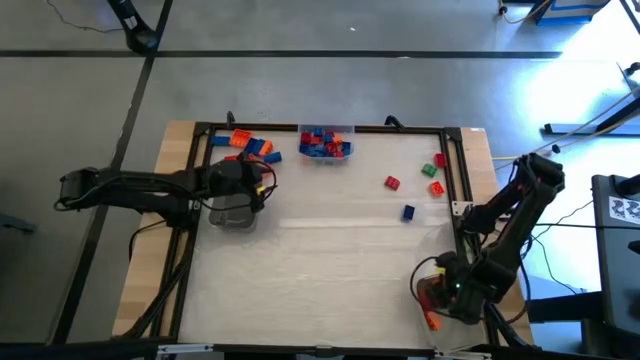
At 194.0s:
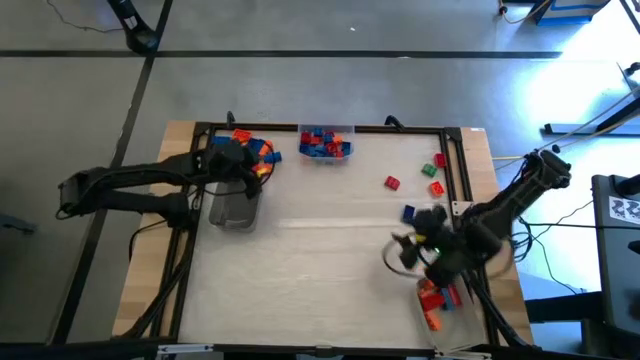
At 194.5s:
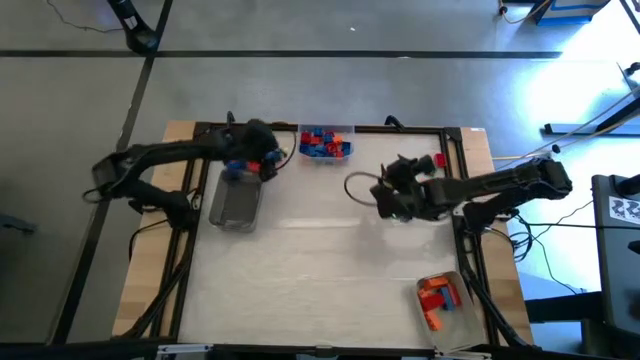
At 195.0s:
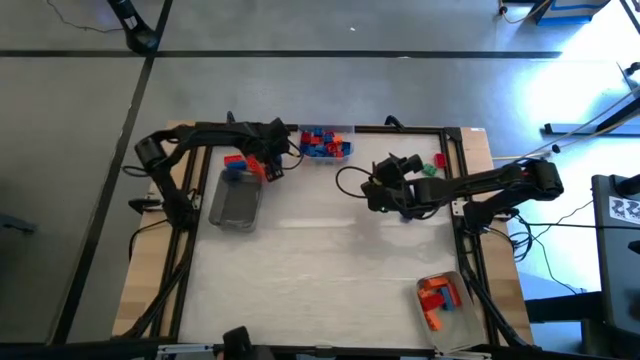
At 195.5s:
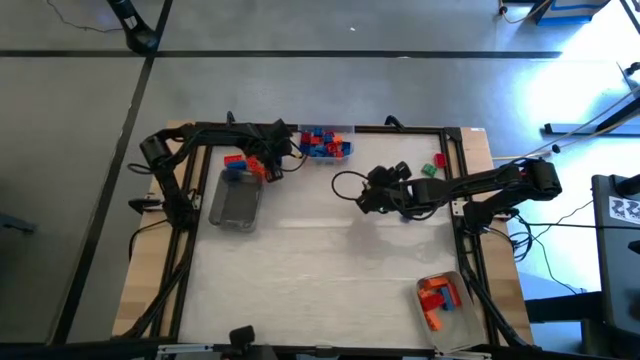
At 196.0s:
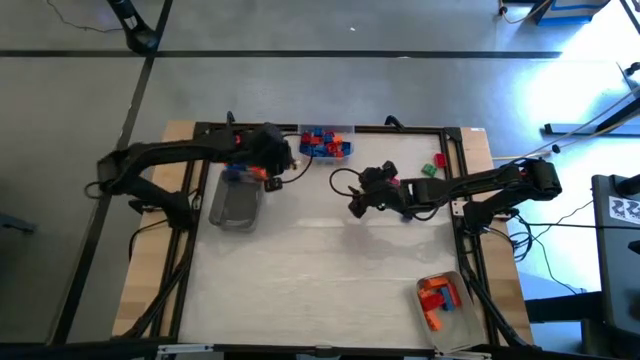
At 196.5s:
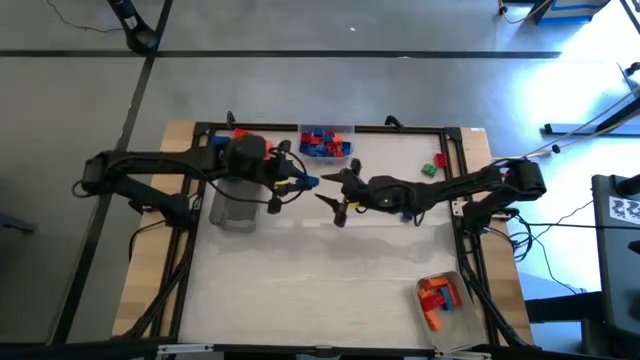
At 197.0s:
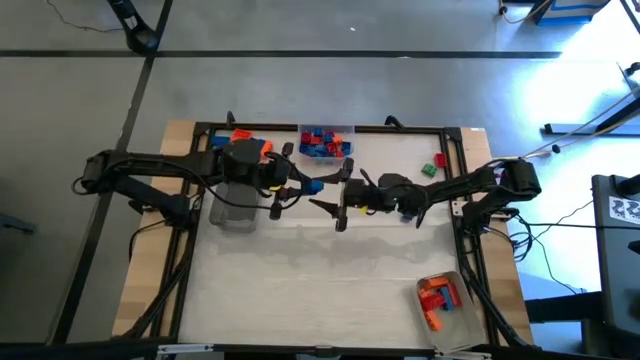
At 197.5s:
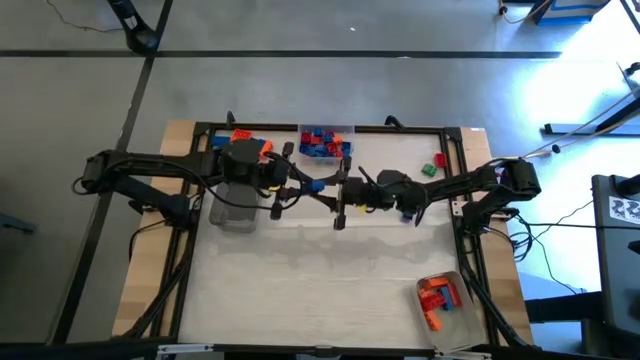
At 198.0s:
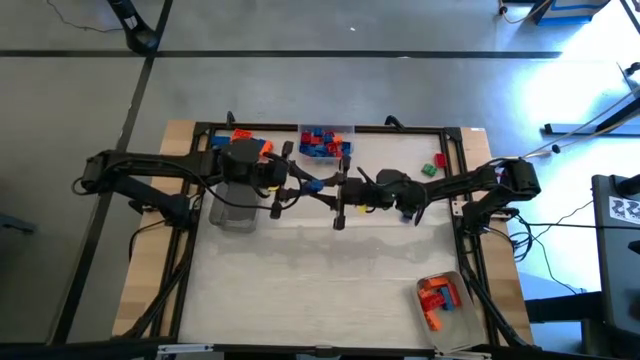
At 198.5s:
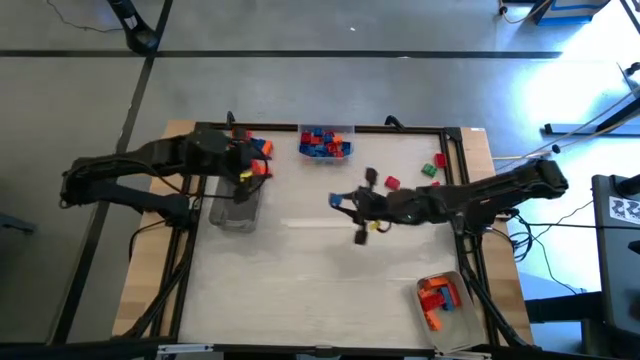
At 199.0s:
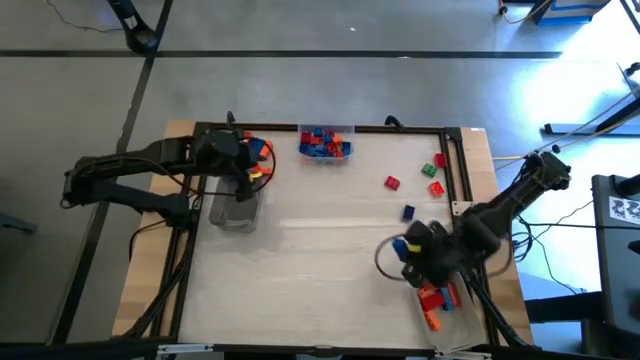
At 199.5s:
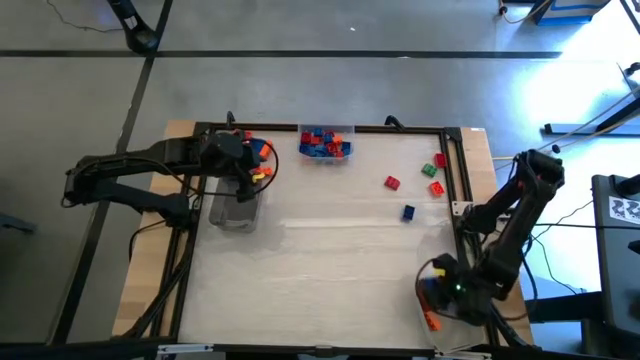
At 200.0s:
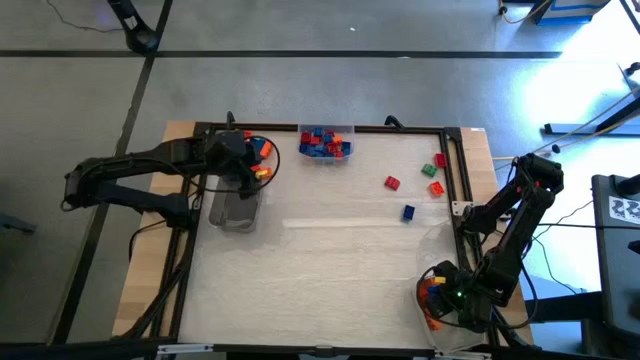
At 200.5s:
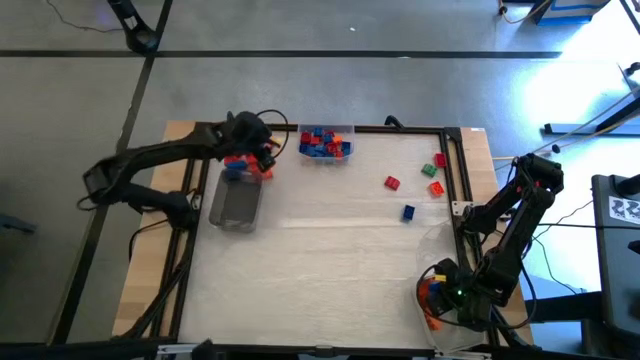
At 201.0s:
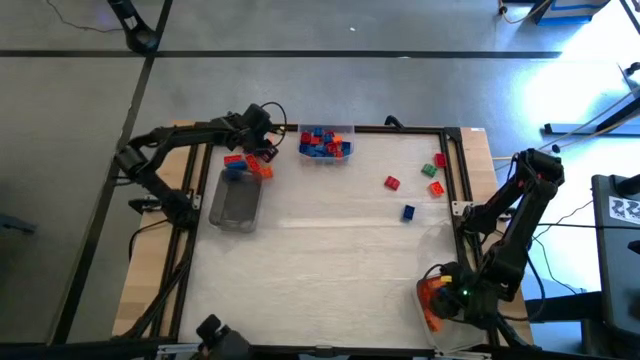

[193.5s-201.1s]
Task: Sort blocks by size
Put the blue 8 stud game piece into the gray bin

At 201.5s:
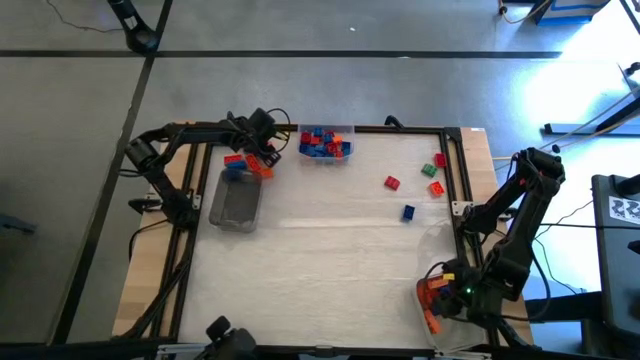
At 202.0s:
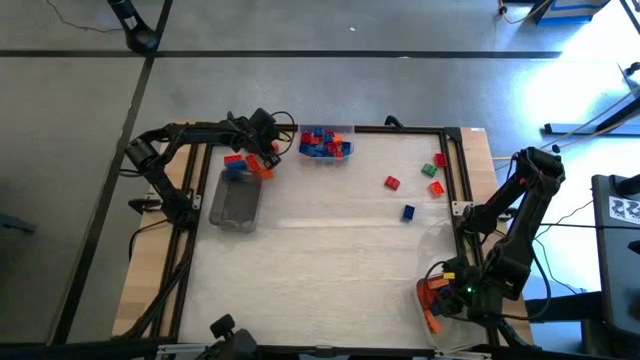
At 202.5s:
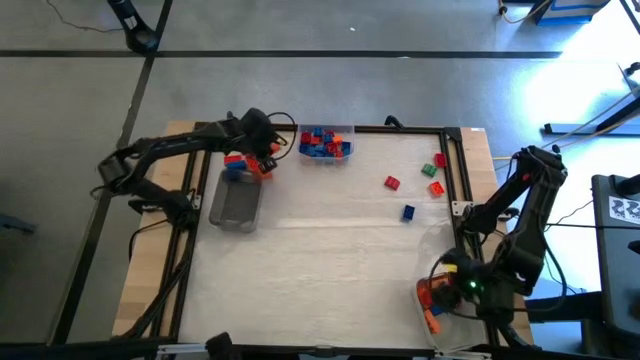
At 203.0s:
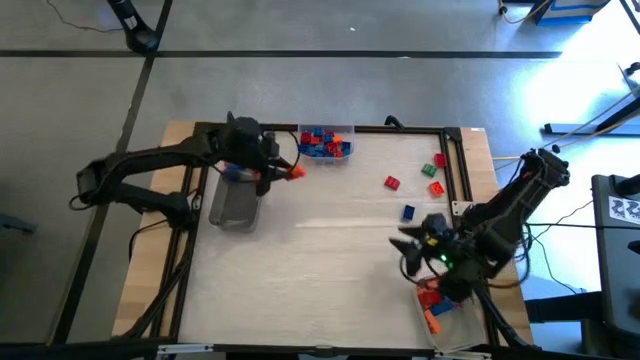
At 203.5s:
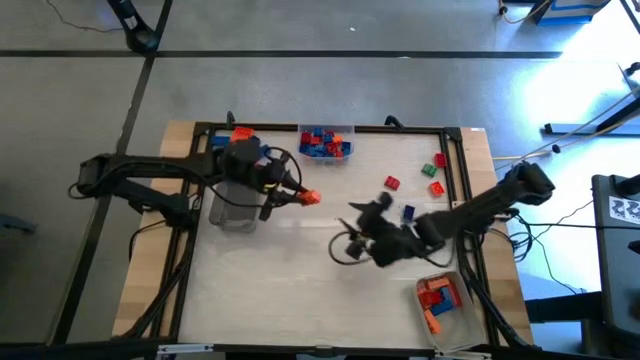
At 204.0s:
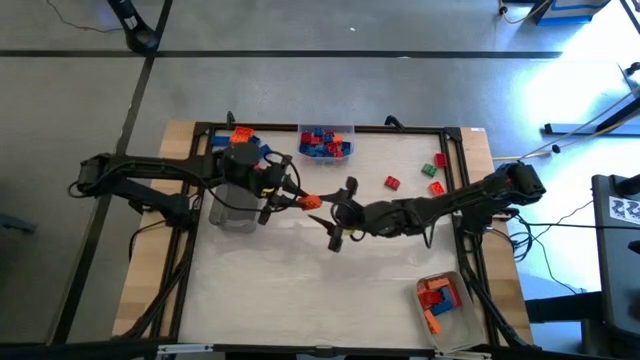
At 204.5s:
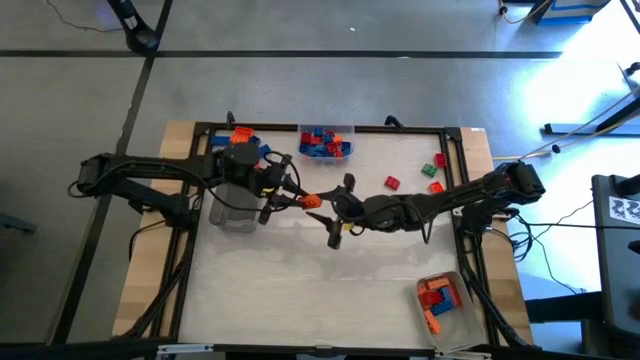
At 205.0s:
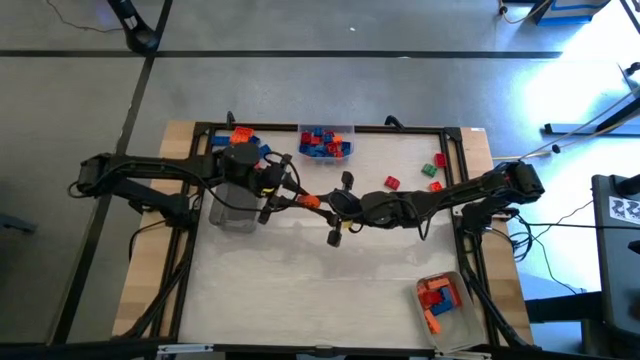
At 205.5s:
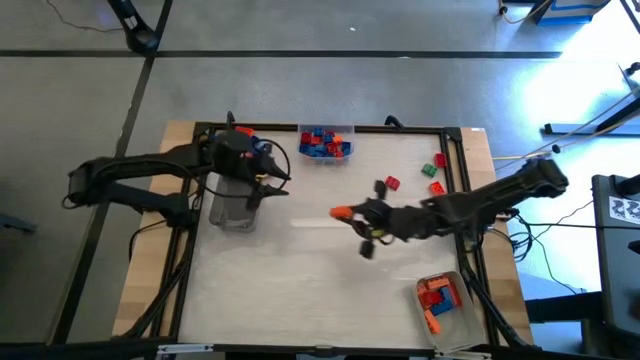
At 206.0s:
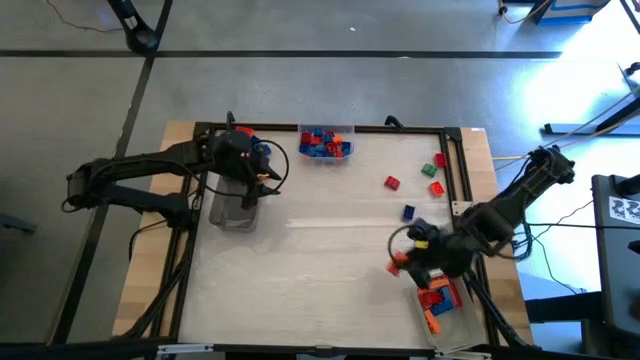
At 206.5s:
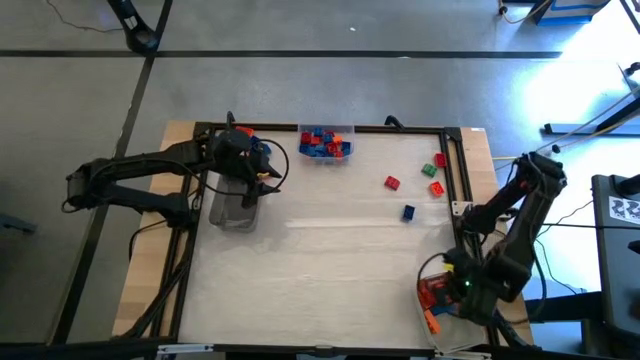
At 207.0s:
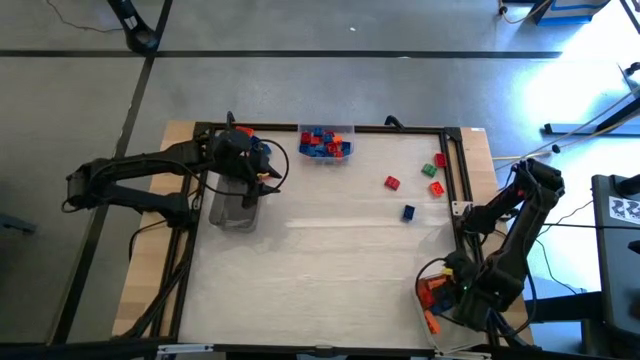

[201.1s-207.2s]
Put the orange 8 stud game piece into the gray bin

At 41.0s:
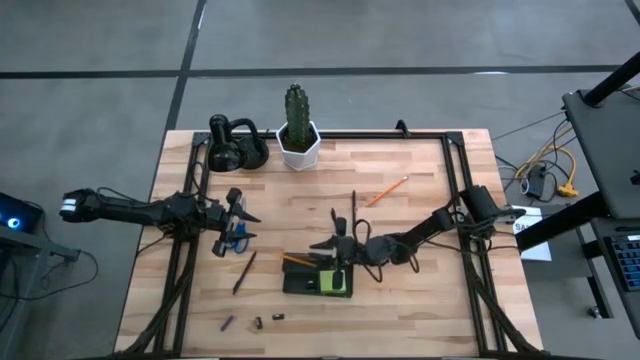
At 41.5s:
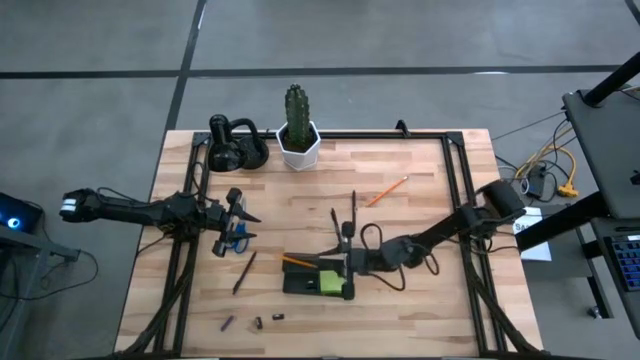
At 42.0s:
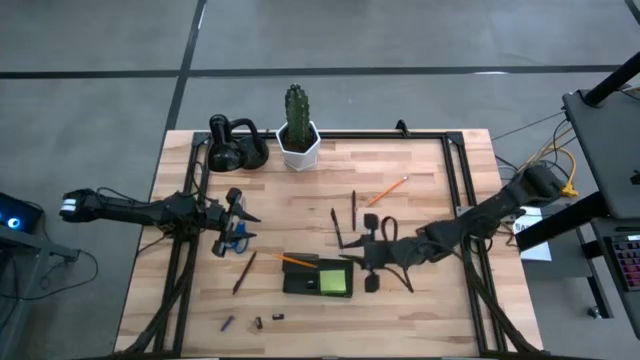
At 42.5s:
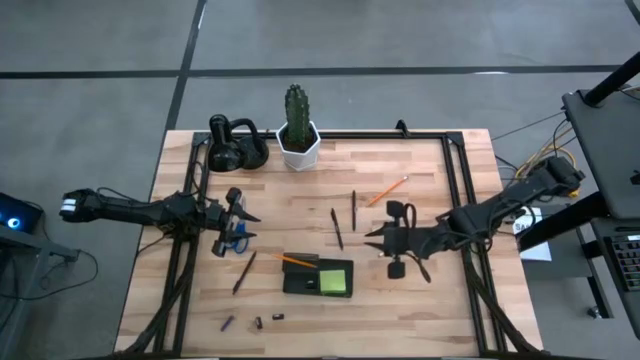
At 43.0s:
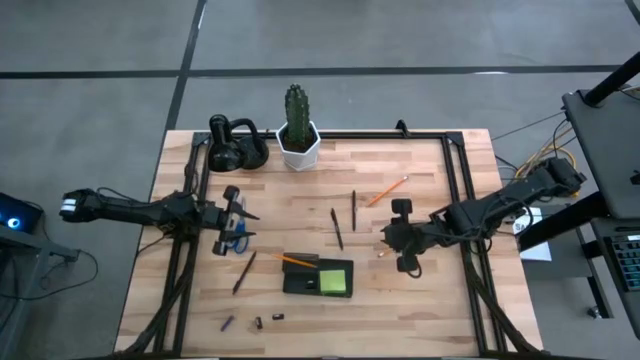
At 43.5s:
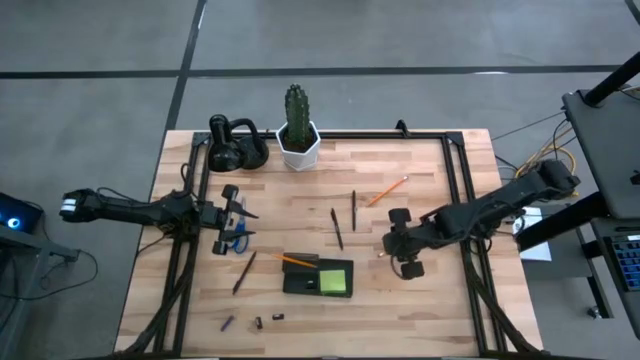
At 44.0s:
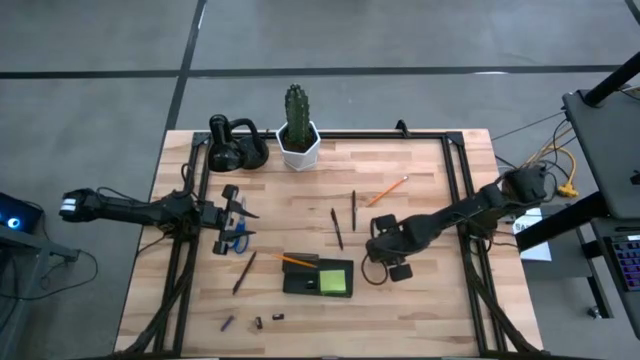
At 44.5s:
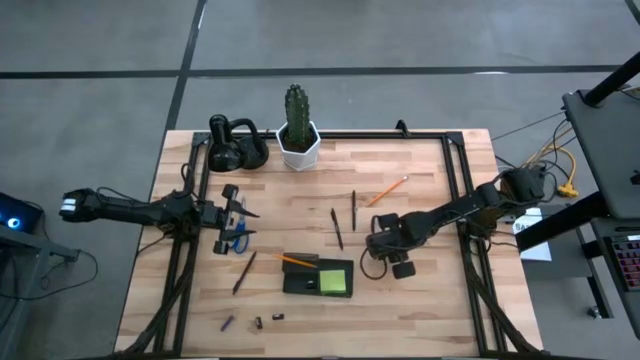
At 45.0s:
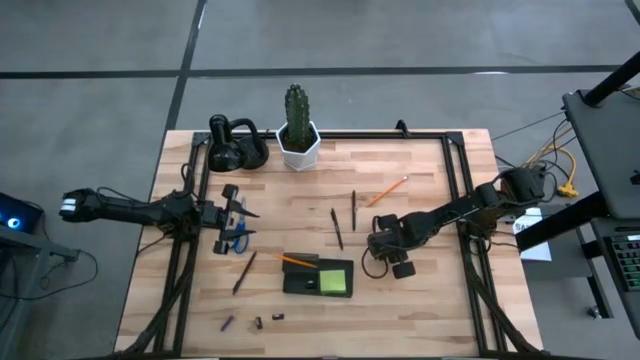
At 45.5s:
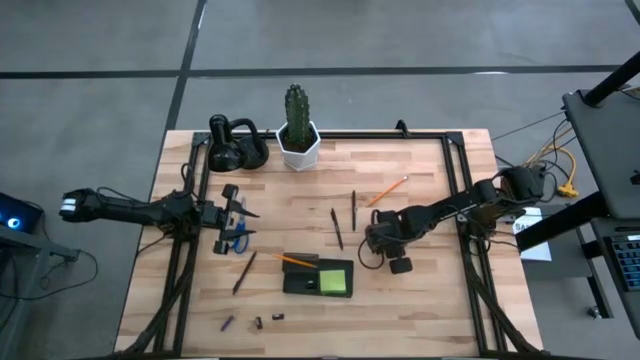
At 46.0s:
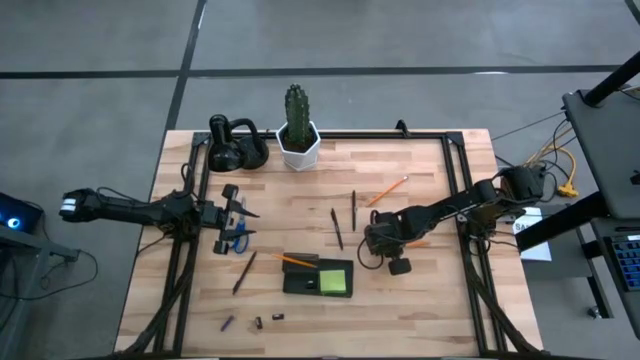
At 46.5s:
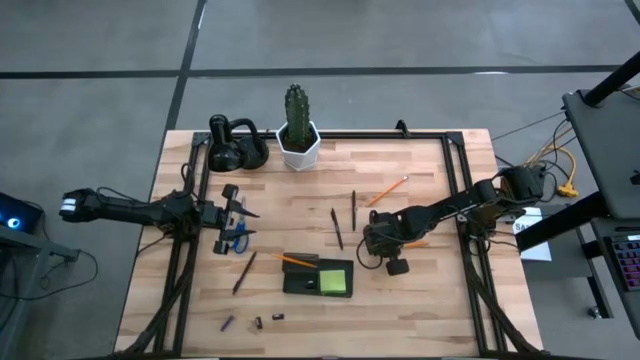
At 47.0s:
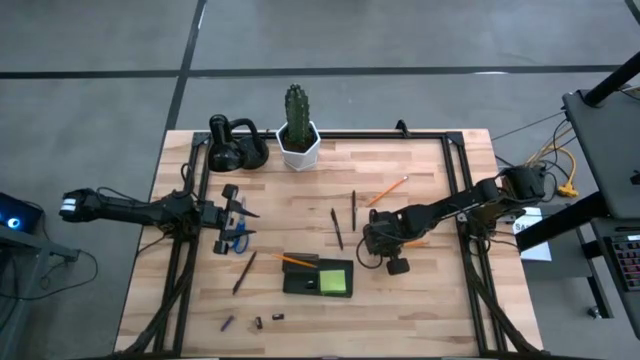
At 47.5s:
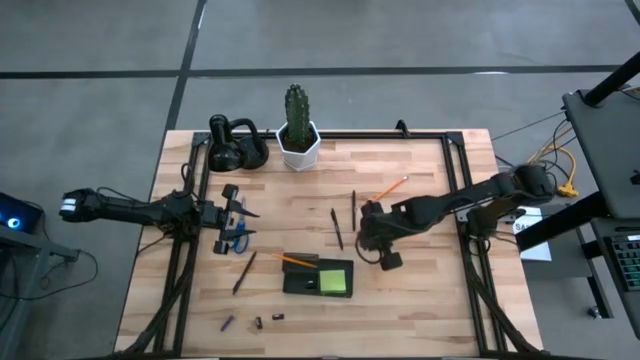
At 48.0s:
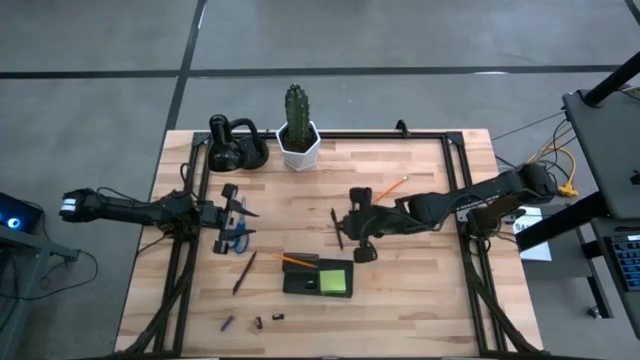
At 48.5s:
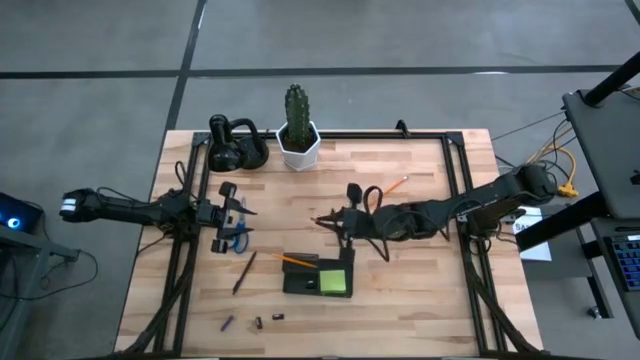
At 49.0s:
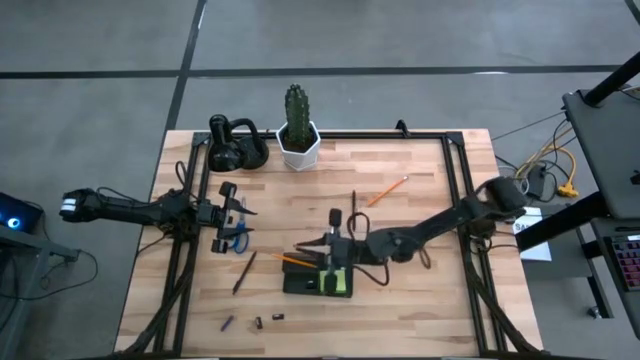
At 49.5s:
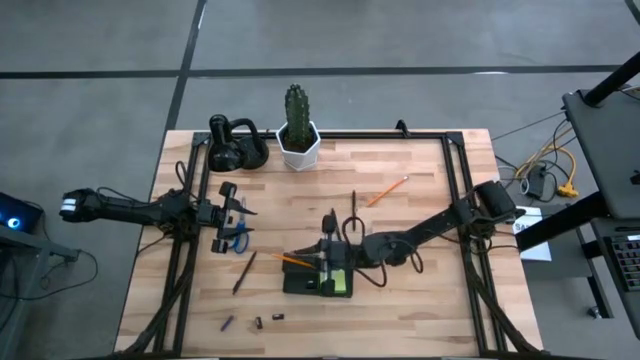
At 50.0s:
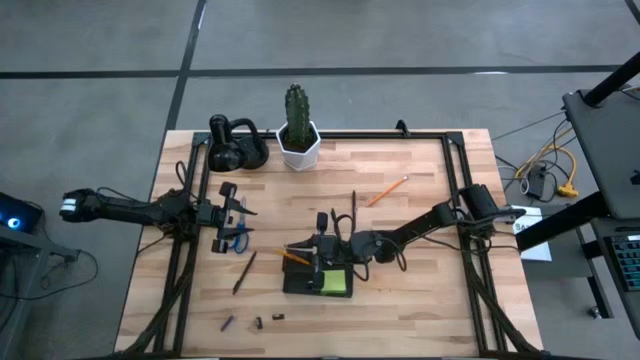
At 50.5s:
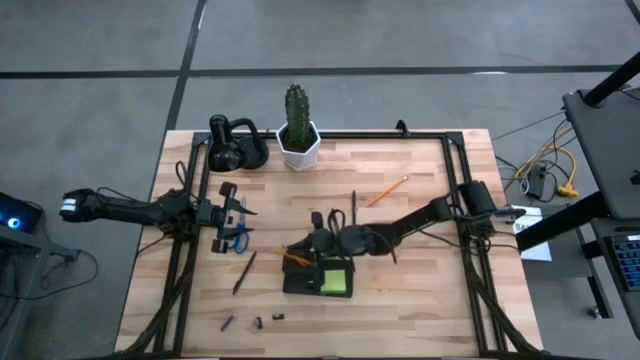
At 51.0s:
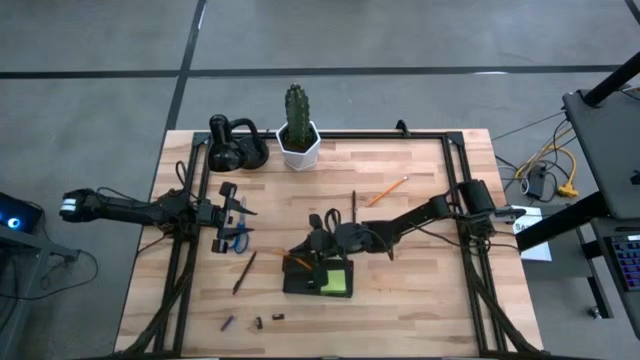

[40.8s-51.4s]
Task: Pick and place office supplies into organizer
Put the bottom yellow pencil into the desk organizer
